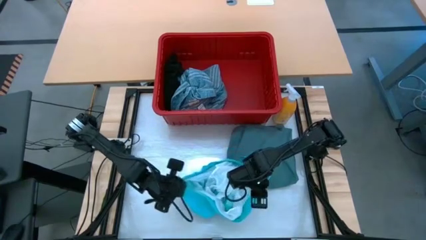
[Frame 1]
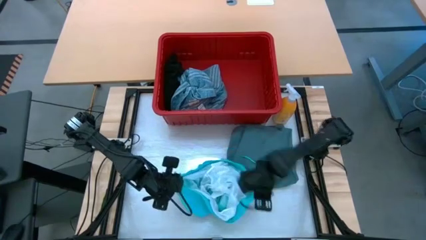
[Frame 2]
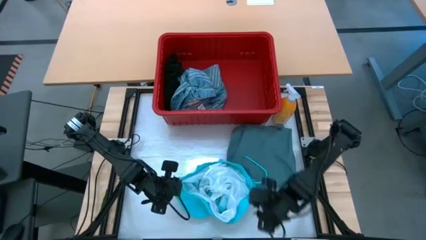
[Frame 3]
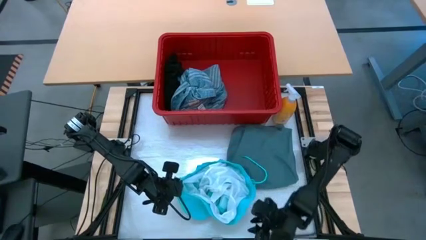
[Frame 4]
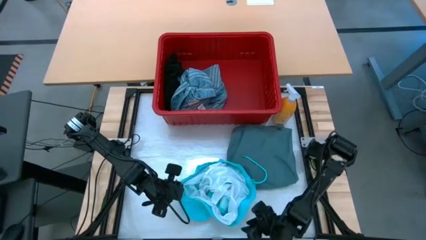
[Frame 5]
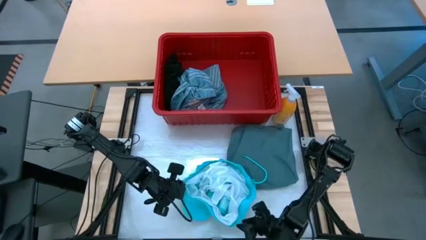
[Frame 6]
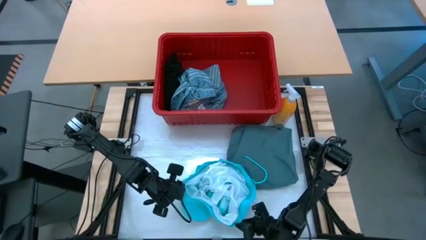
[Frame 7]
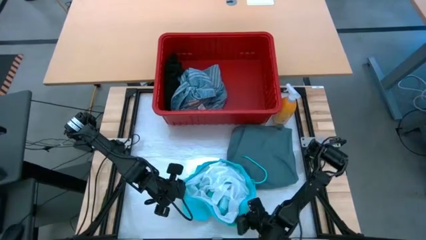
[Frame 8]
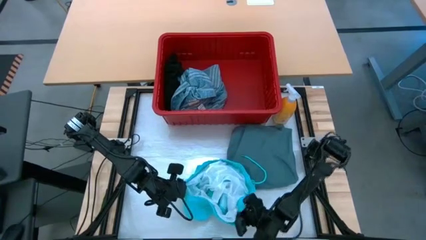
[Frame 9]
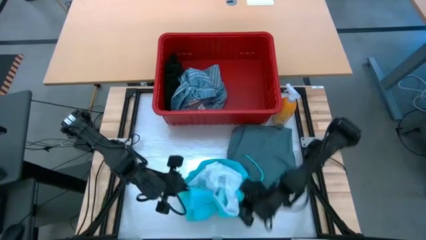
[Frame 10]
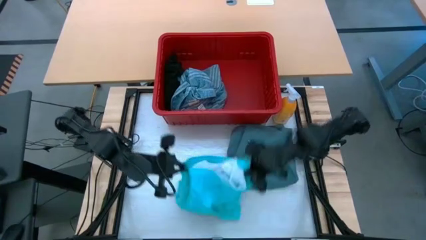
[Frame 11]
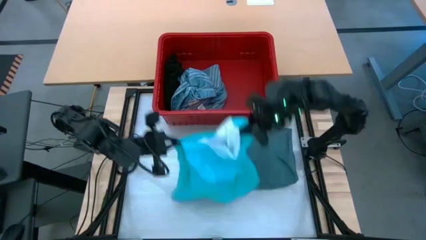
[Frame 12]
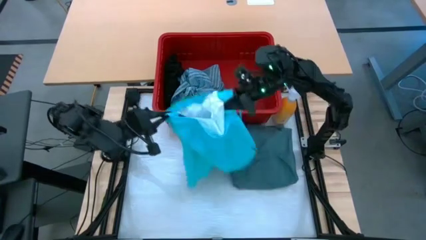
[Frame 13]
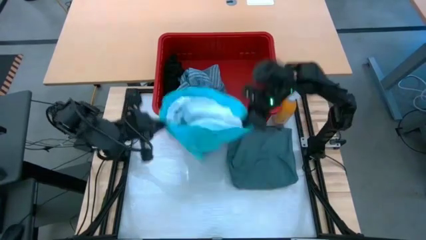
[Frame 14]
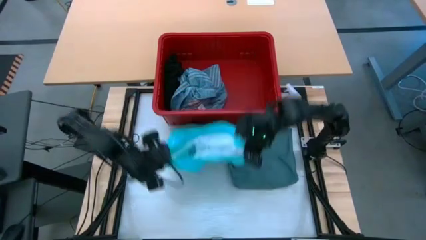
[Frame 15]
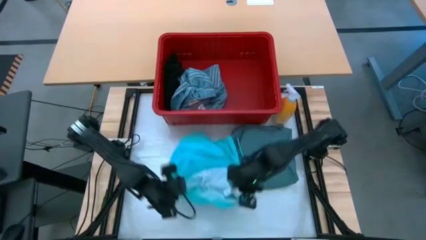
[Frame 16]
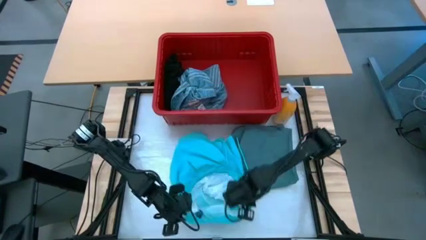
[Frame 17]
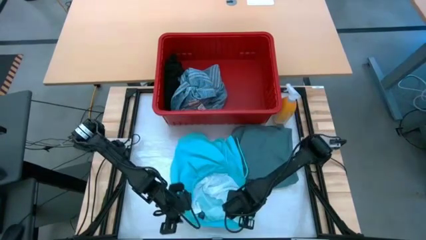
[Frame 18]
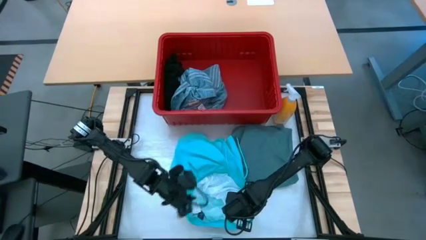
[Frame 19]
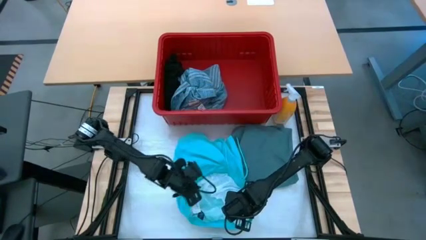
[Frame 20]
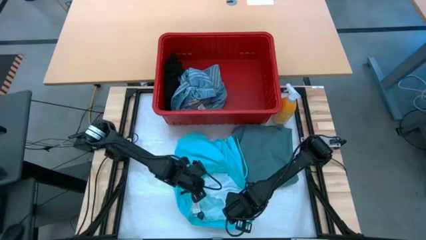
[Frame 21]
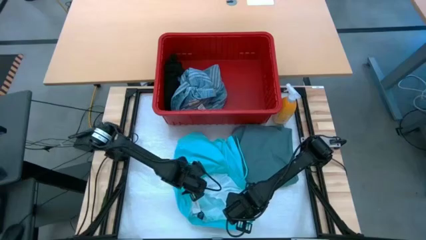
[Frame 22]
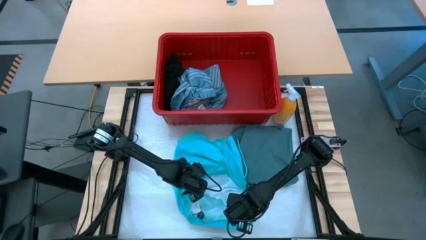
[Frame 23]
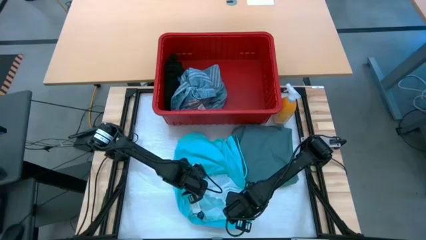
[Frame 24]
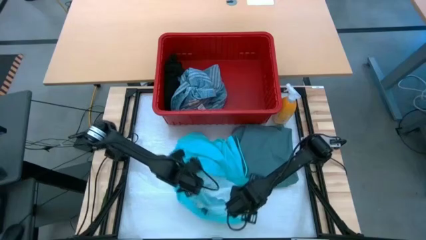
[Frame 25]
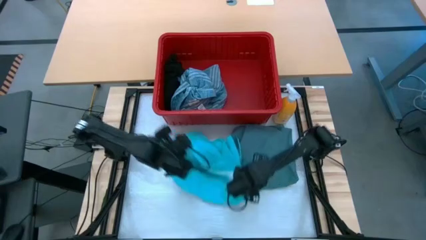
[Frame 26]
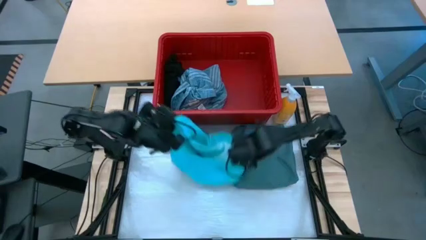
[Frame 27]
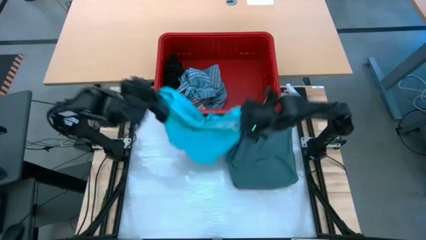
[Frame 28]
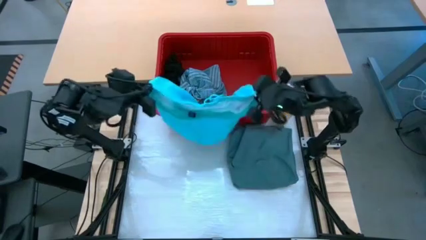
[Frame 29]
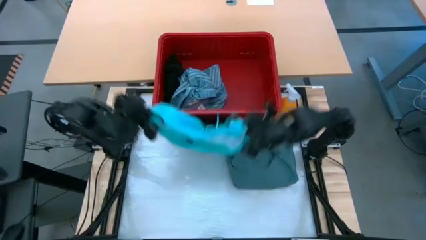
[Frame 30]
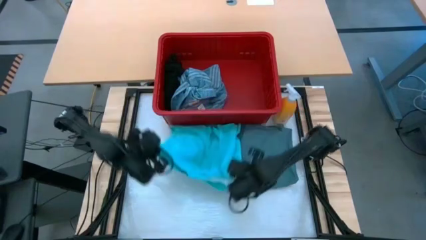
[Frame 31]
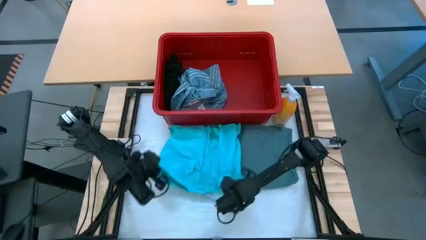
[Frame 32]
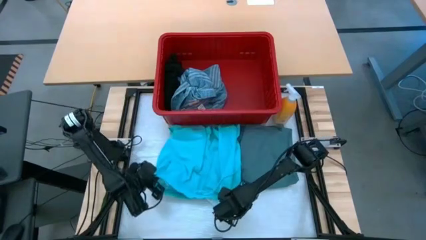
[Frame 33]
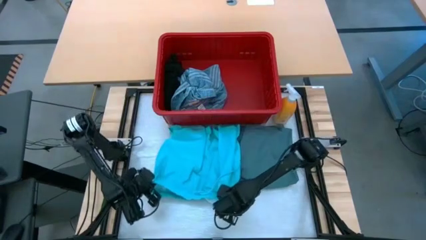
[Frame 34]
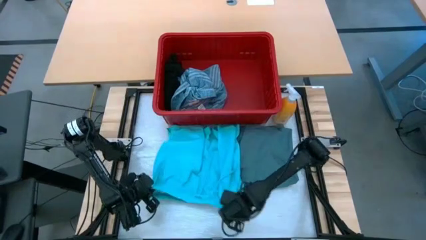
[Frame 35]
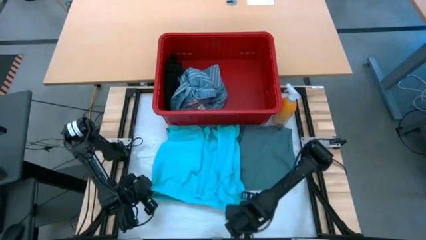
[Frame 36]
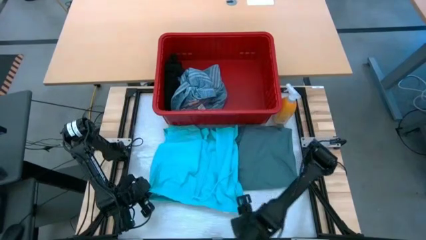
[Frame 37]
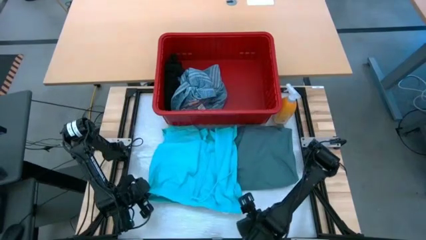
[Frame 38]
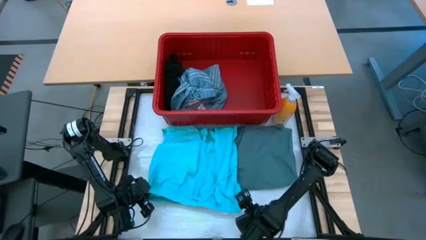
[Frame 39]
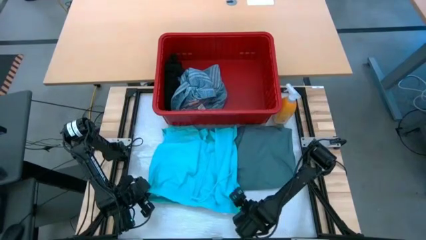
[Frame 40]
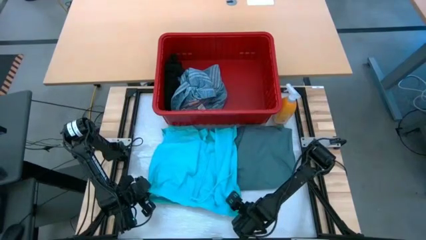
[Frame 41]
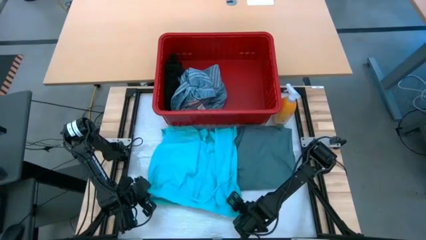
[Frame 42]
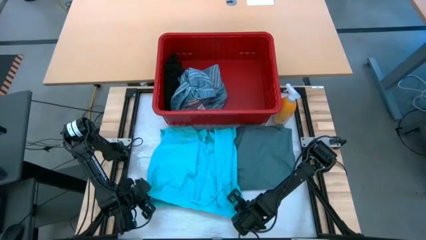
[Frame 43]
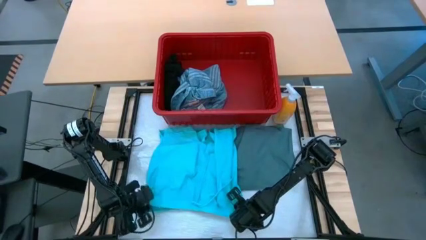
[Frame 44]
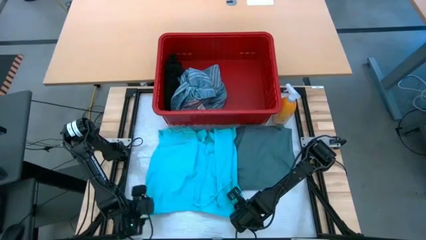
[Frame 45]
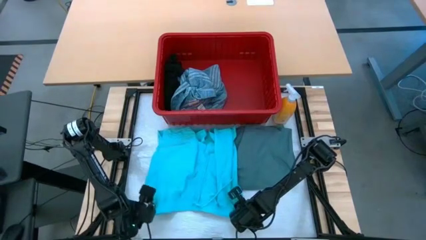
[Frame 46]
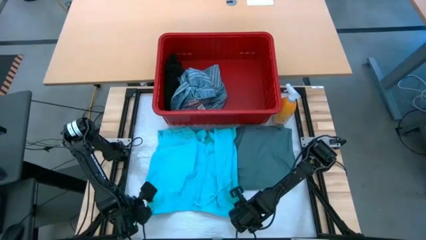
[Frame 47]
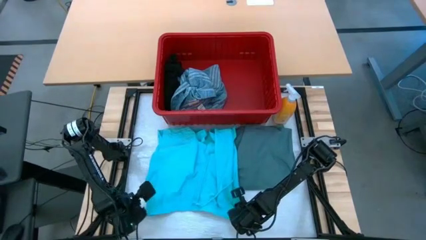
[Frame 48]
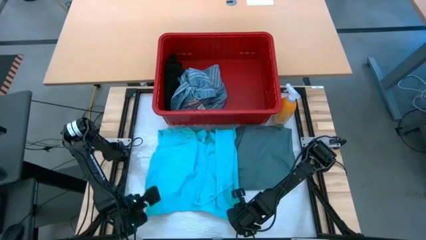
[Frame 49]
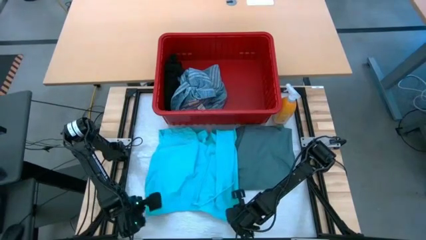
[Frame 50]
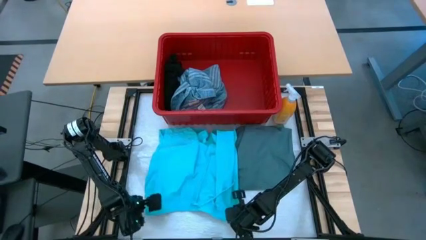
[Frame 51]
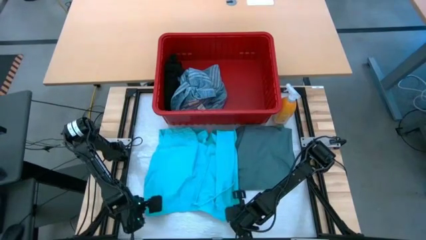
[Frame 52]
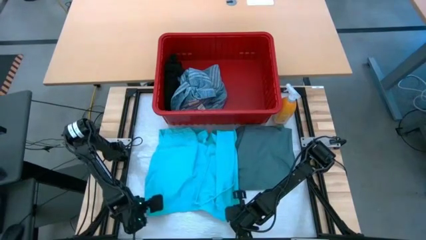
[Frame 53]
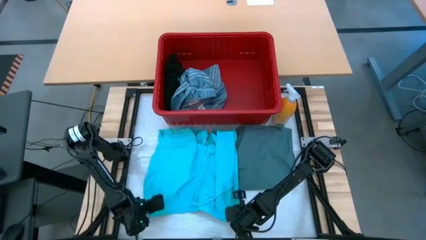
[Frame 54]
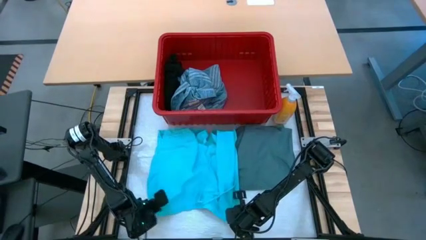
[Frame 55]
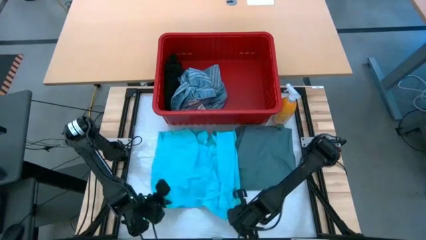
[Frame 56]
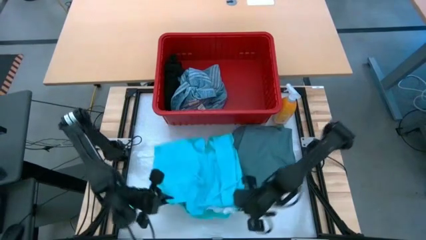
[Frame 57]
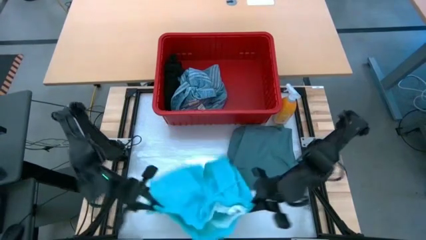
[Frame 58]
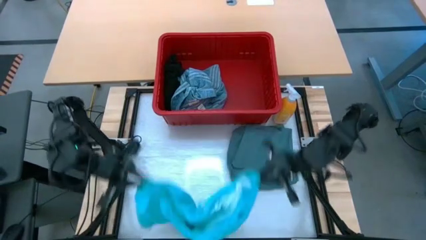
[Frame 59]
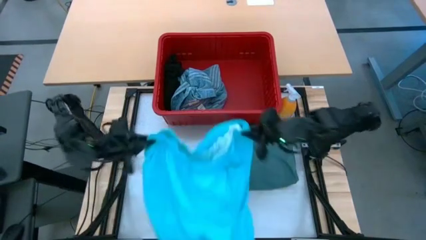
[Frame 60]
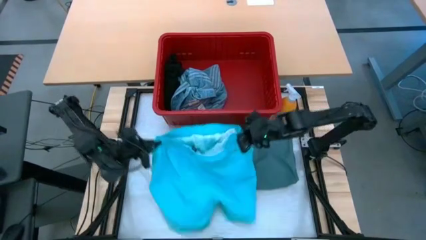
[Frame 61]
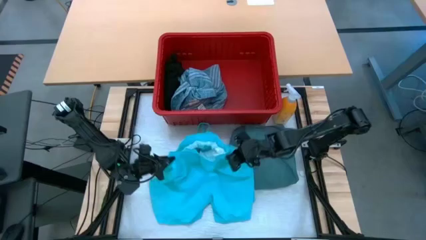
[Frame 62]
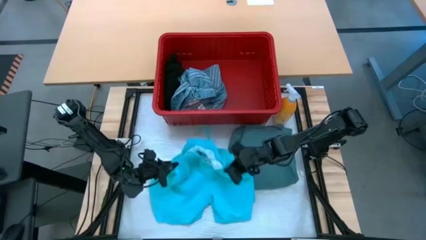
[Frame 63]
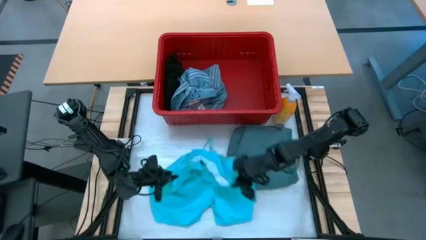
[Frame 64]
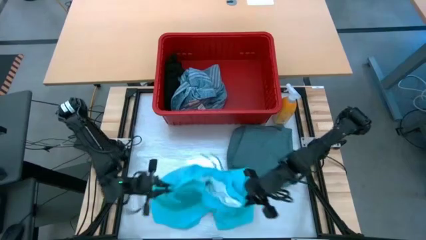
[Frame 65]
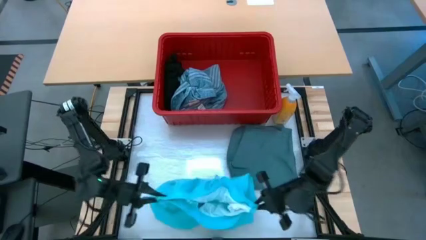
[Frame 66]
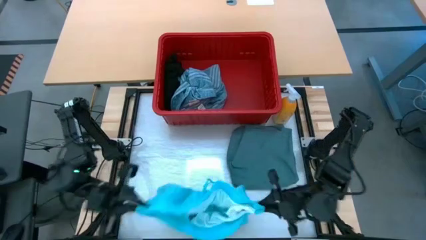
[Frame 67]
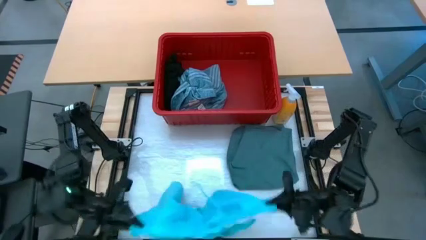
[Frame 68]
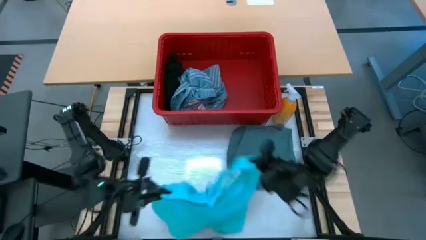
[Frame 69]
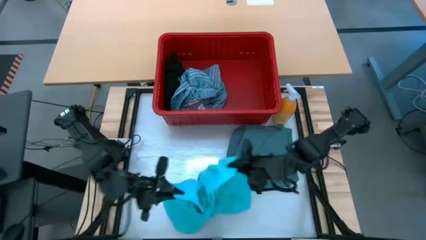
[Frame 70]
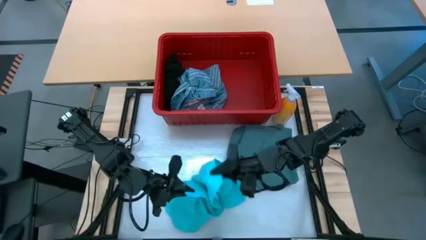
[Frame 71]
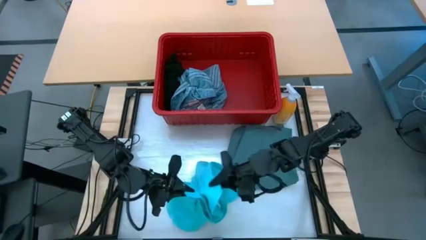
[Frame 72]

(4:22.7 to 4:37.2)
Task: Fold Laundry from Bin
Fold the sky blue shorts
